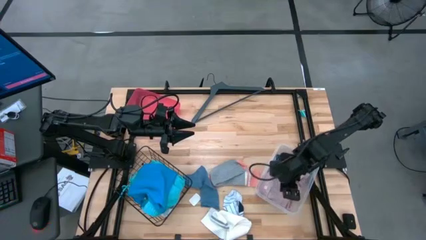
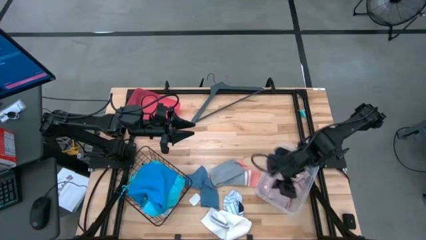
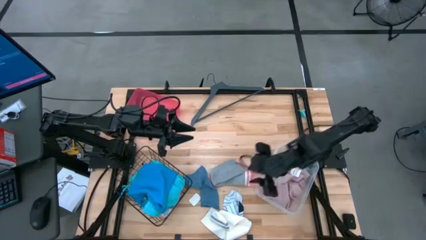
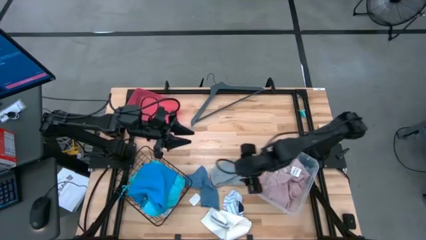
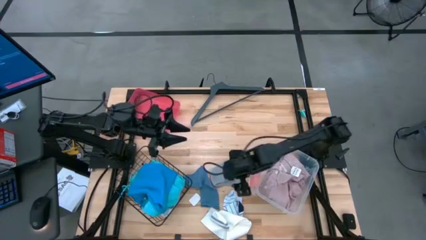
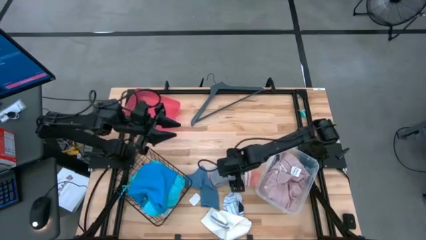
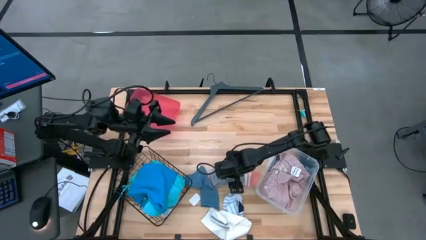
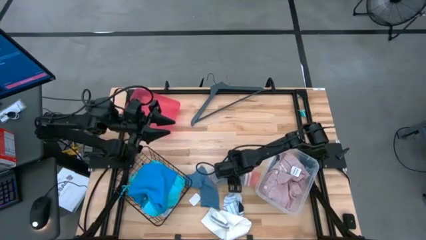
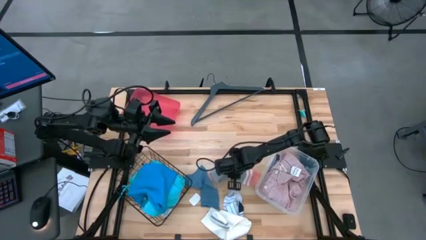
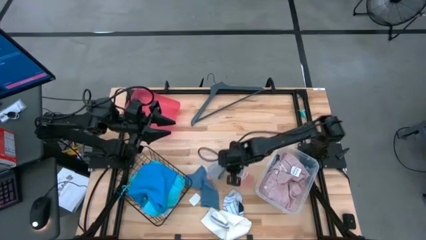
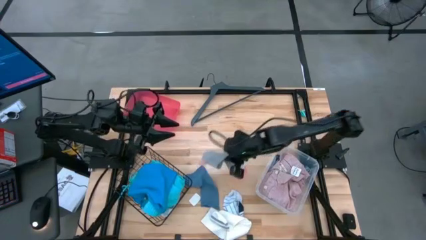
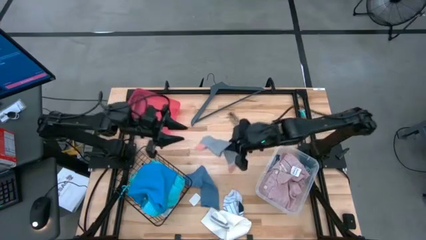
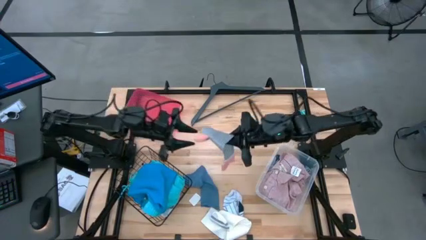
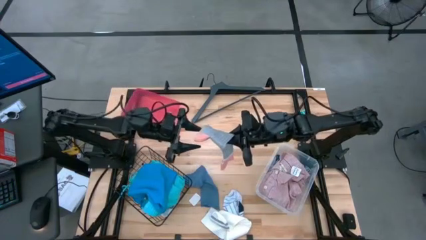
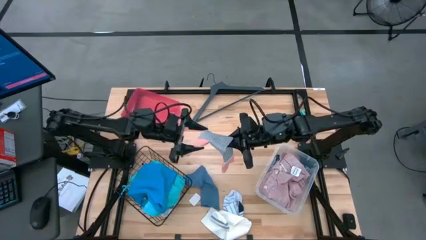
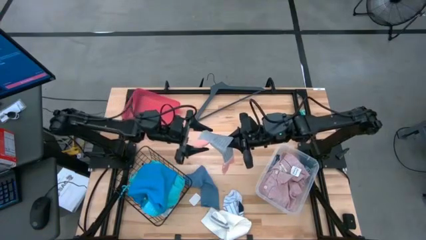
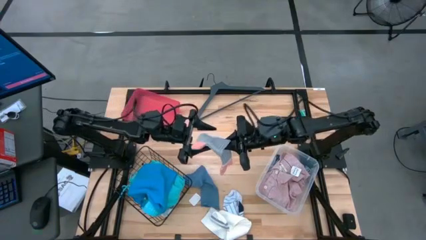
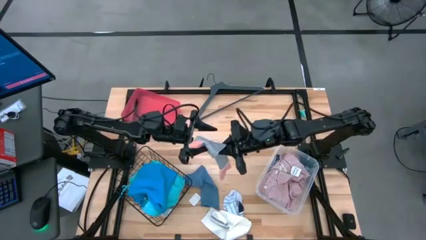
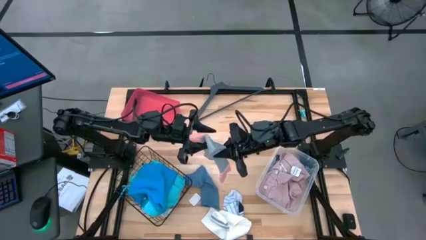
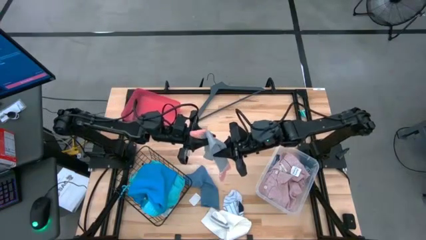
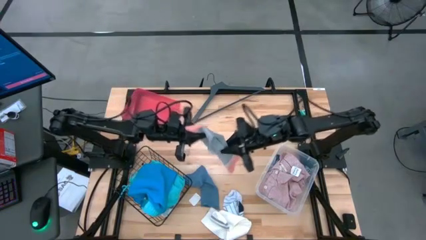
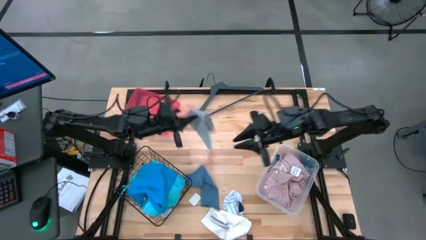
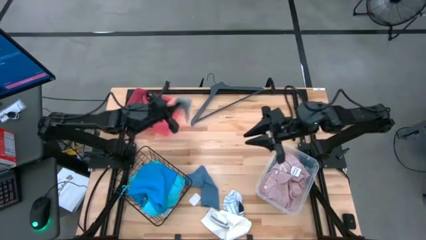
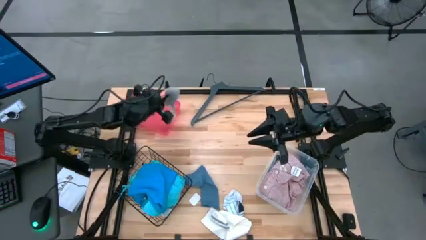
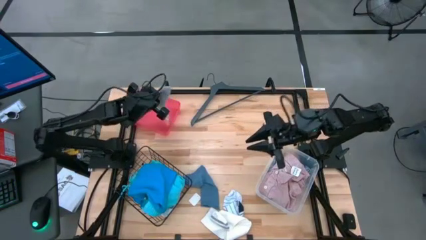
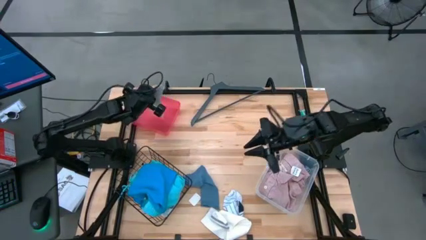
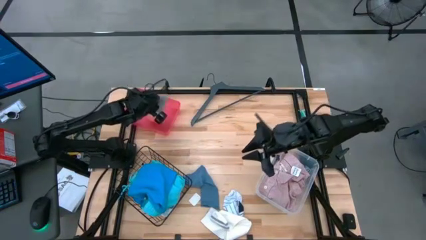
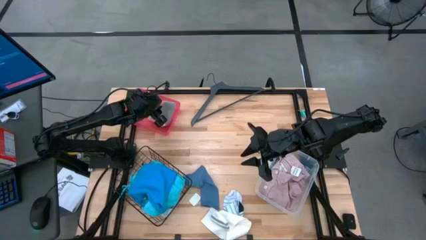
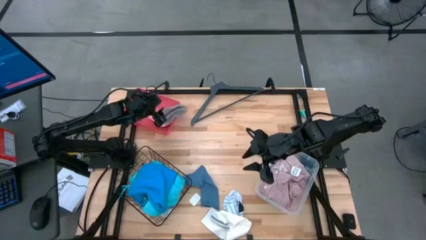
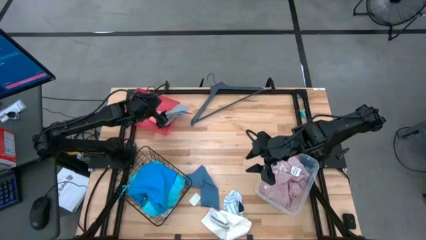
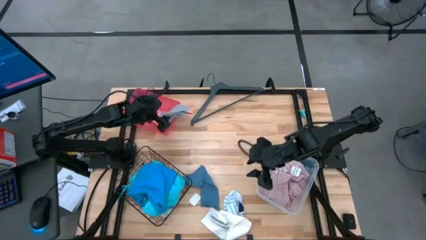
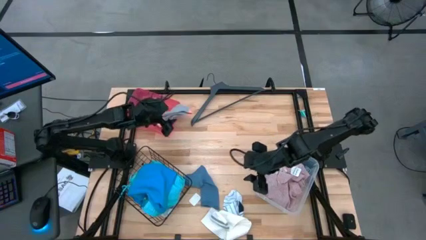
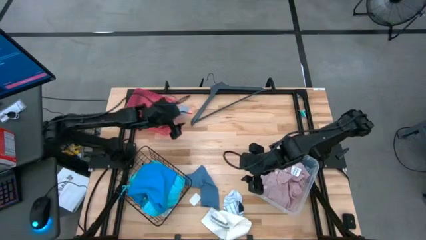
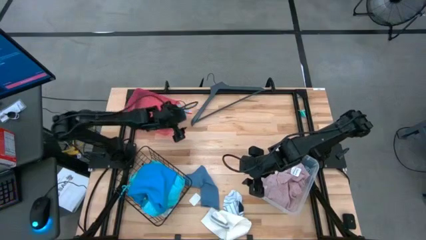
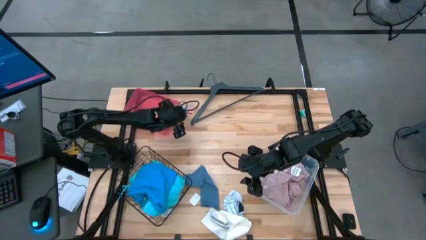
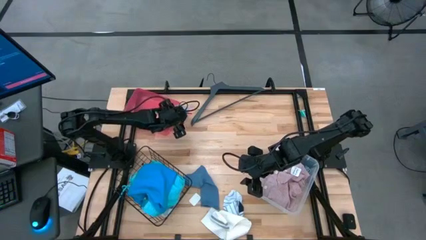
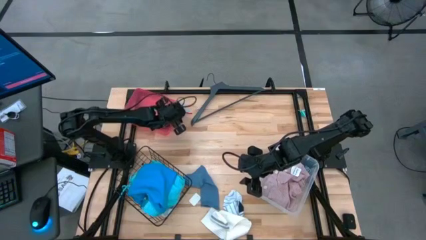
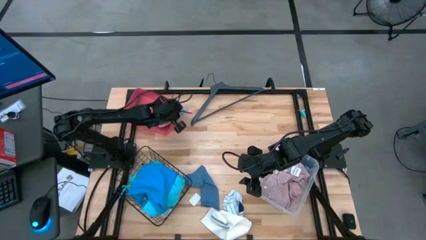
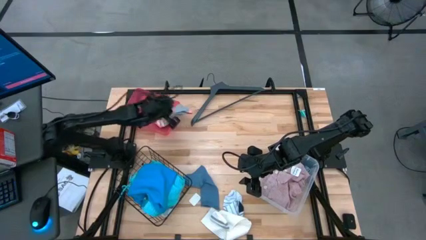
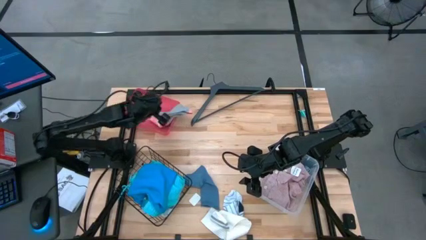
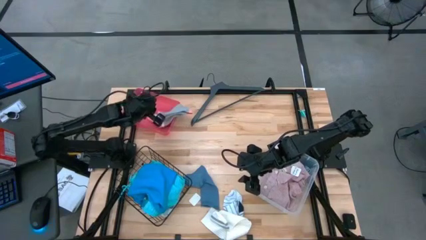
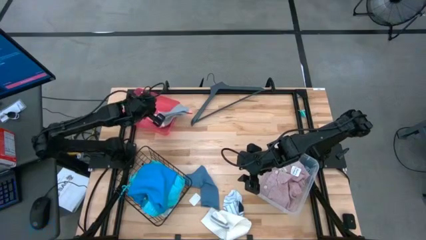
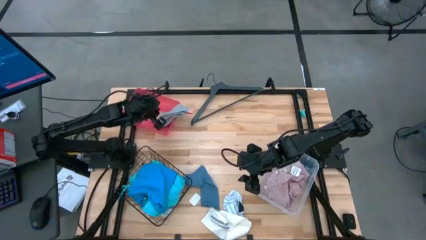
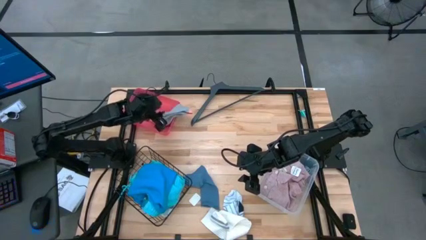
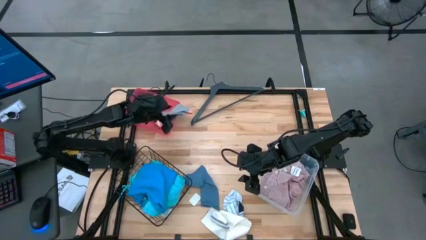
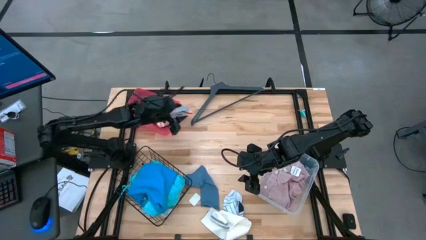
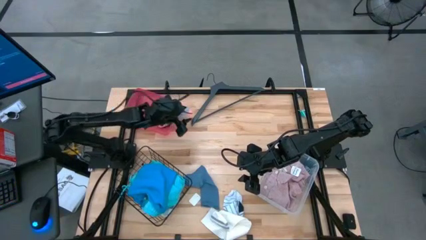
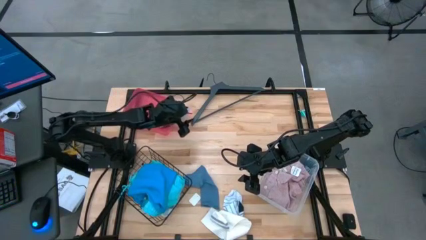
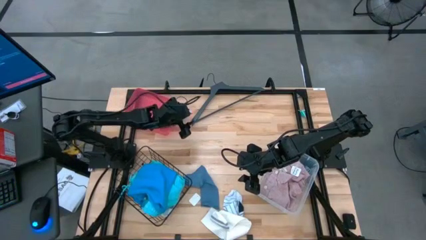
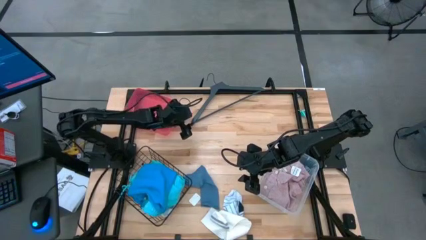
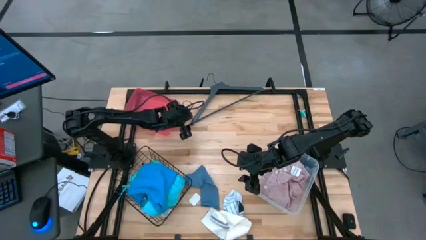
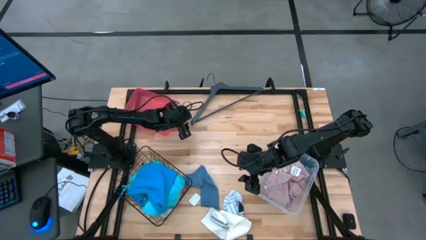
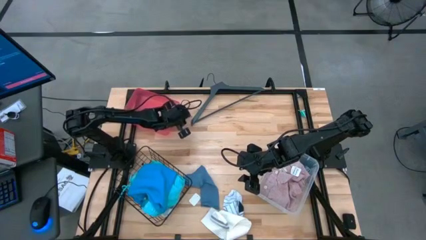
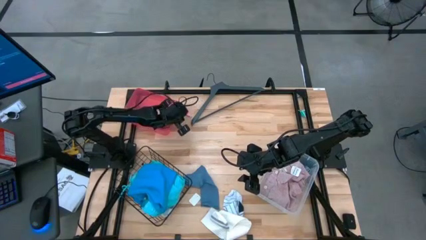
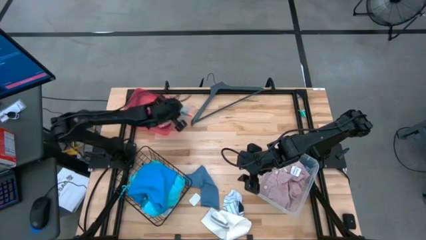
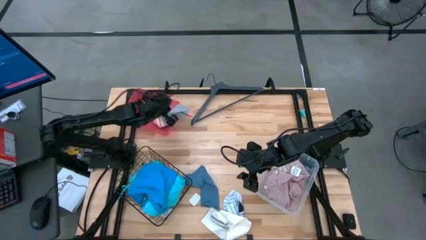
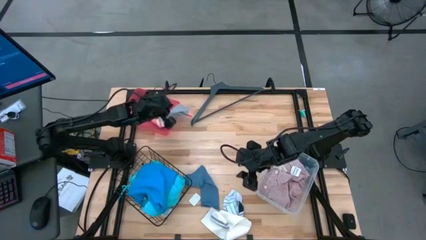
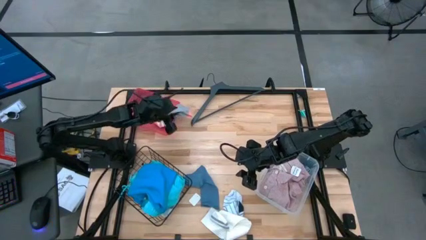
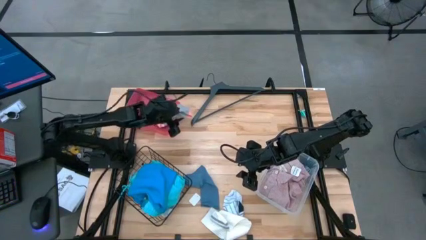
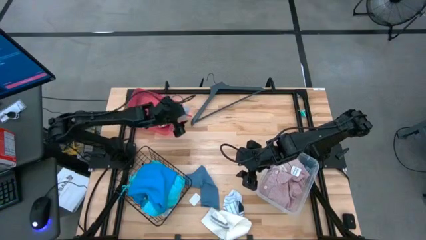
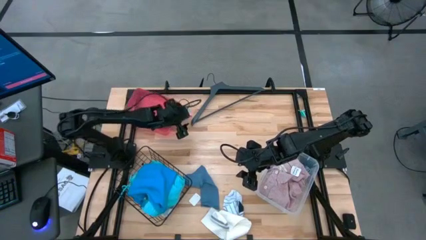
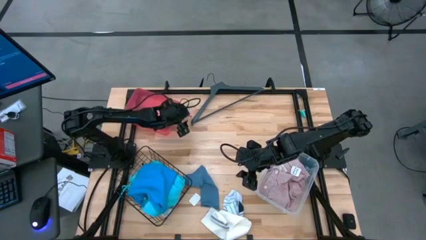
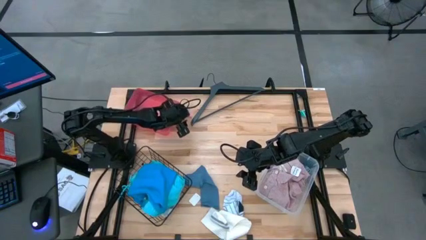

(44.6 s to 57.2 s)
Task: Pick & Place Cloths
Put the gray sock into the red bin

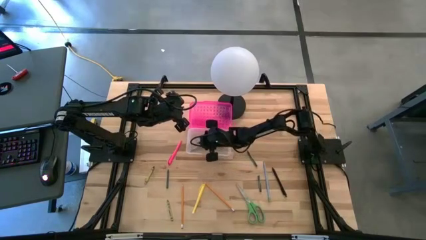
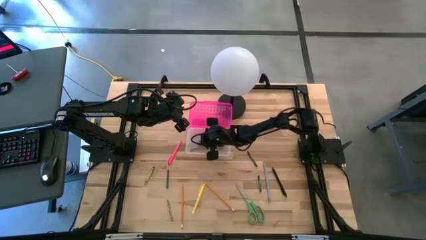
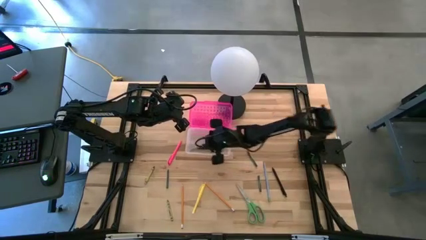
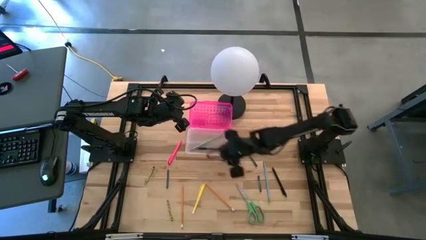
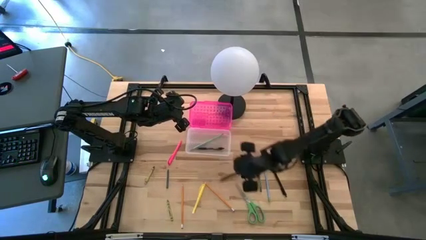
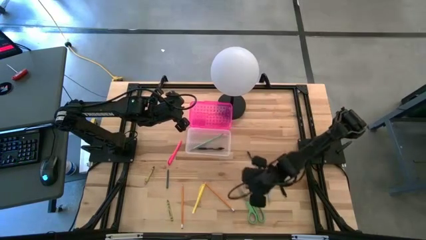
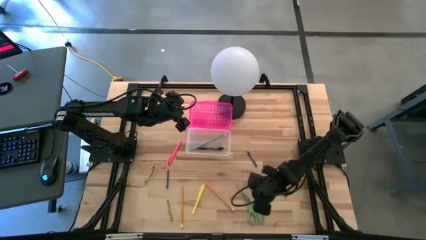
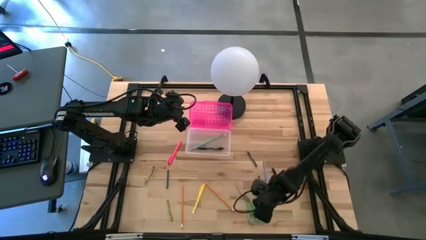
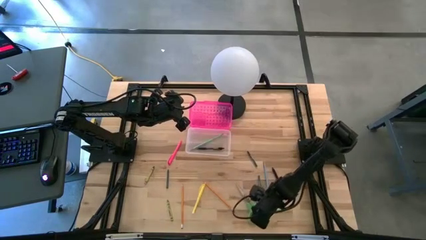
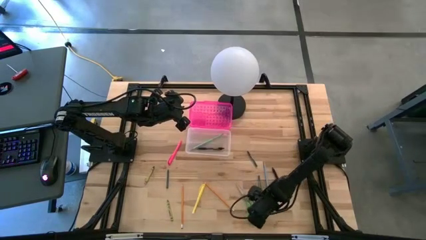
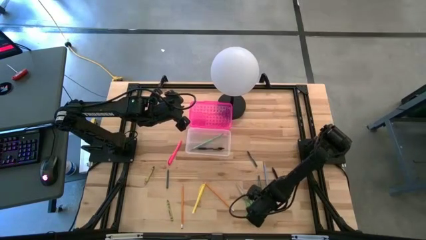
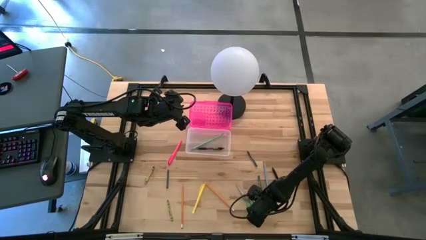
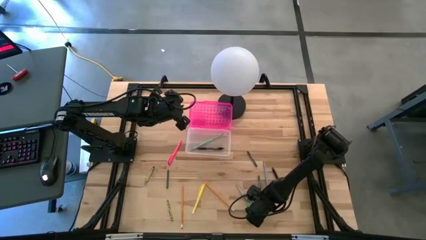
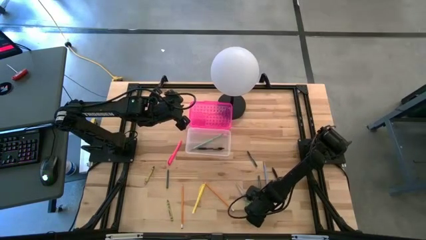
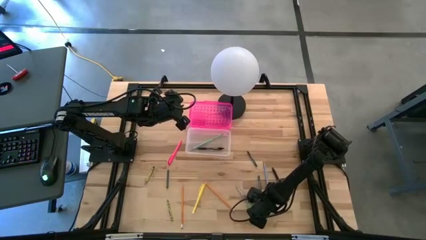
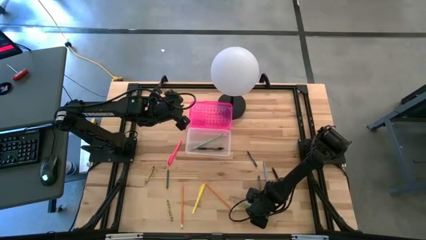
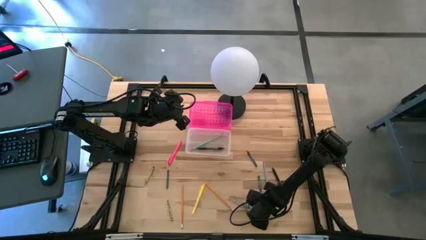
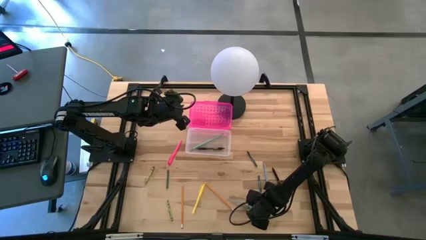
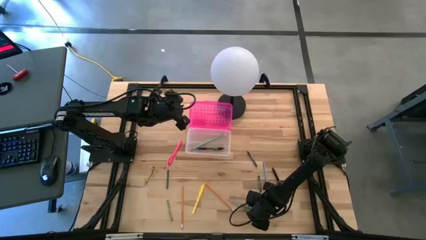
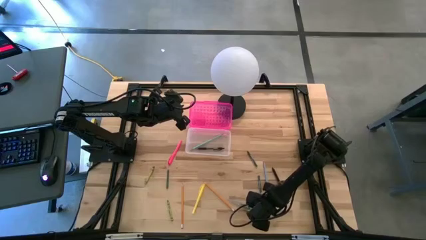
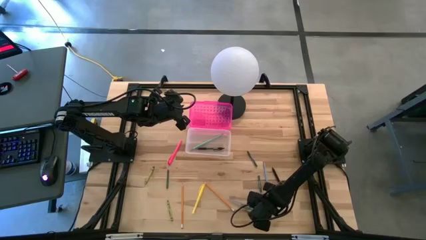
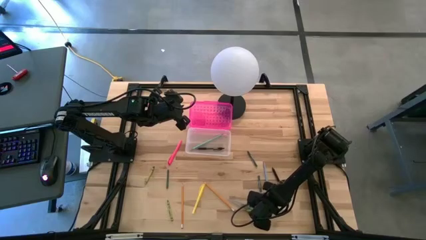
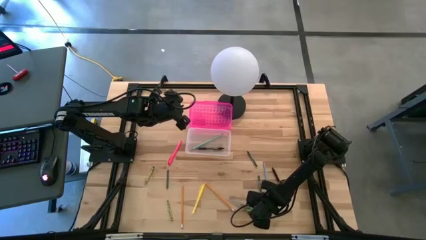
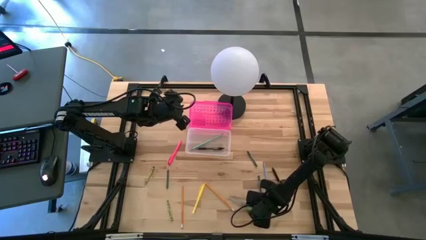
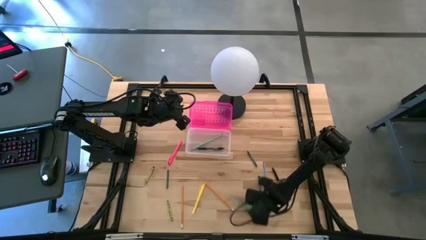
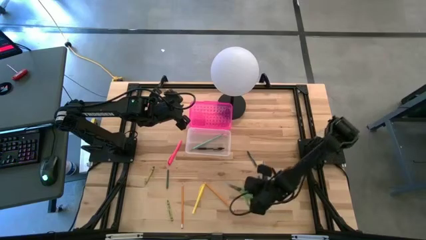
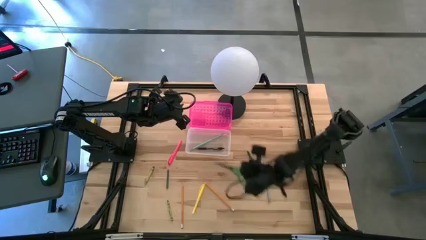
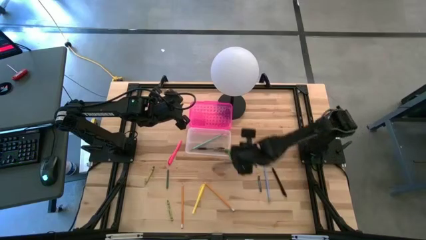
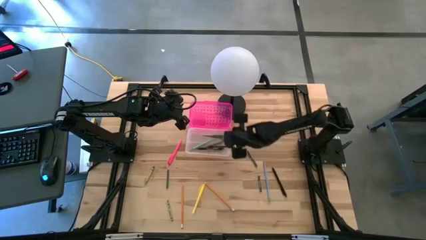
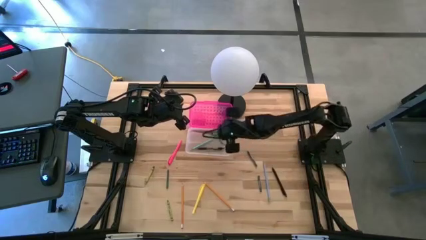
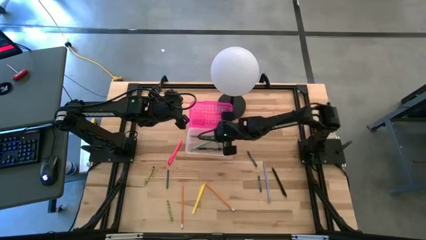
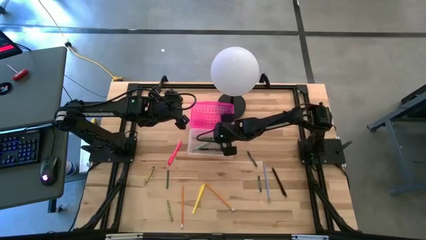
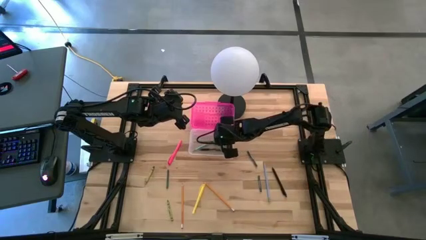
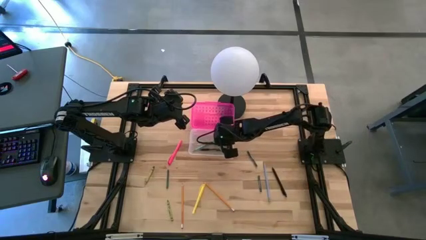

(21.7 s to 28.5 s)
Task: Pick & place school supplies into a supply box
Put the green scissors into the pink supply box
